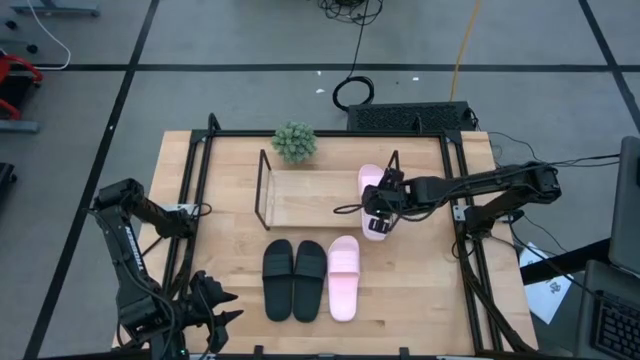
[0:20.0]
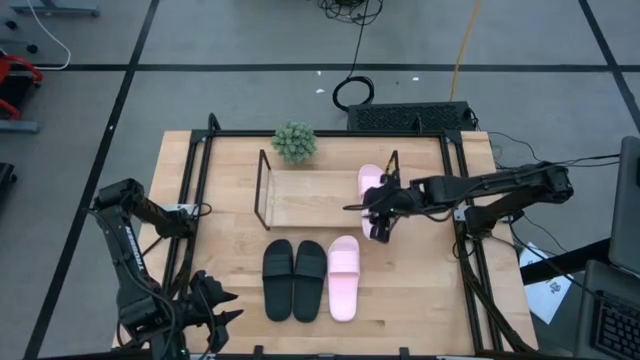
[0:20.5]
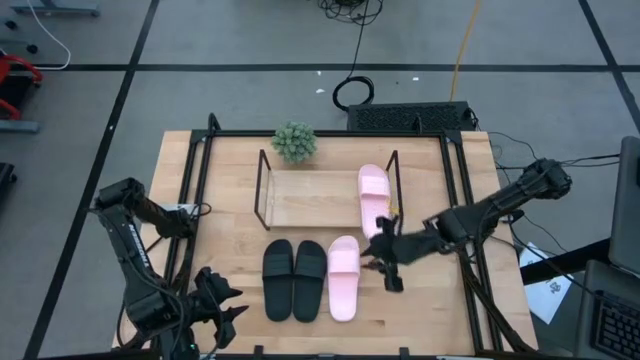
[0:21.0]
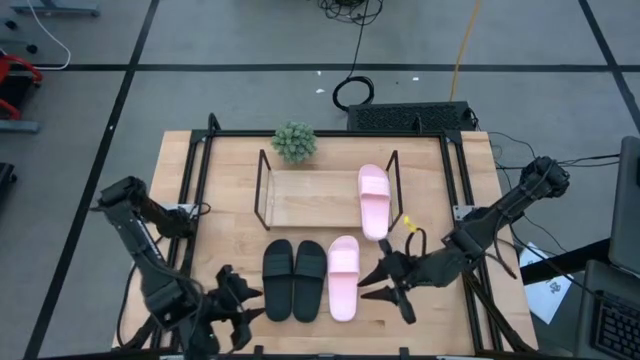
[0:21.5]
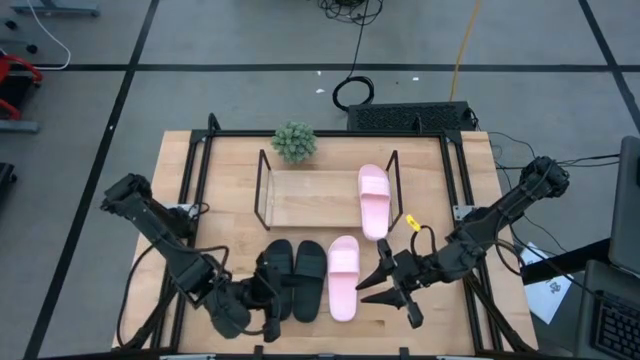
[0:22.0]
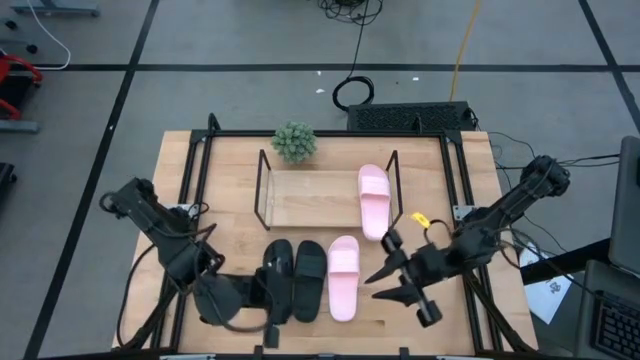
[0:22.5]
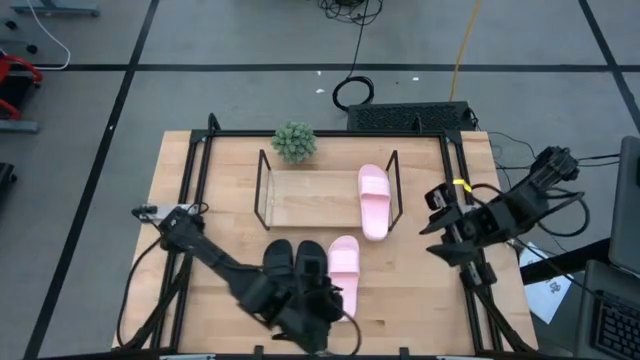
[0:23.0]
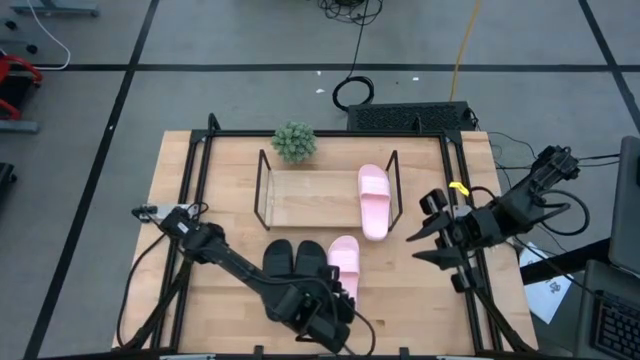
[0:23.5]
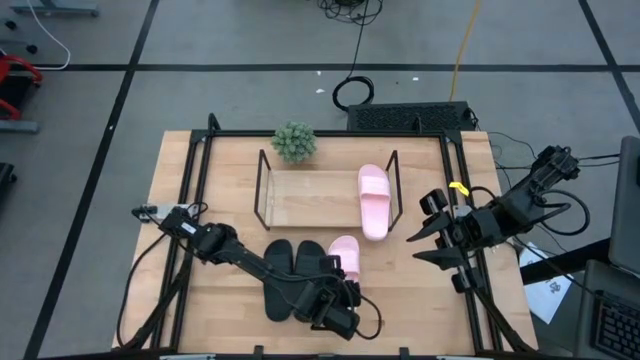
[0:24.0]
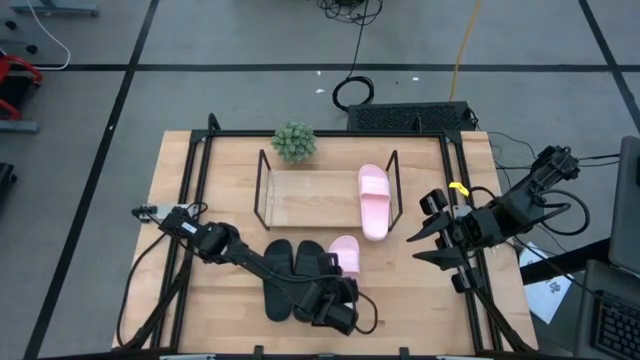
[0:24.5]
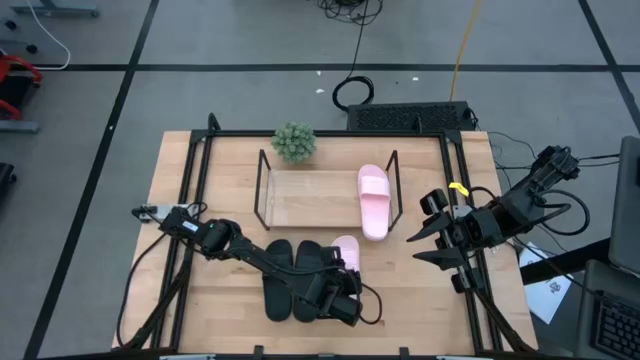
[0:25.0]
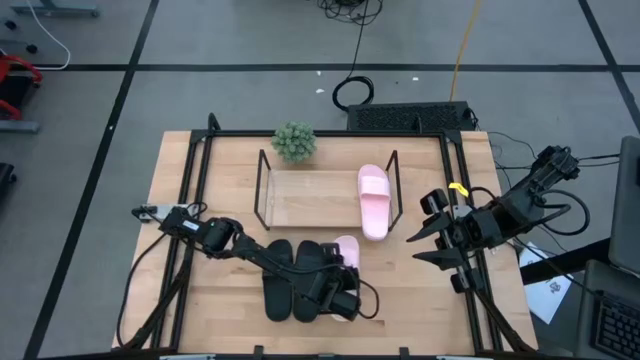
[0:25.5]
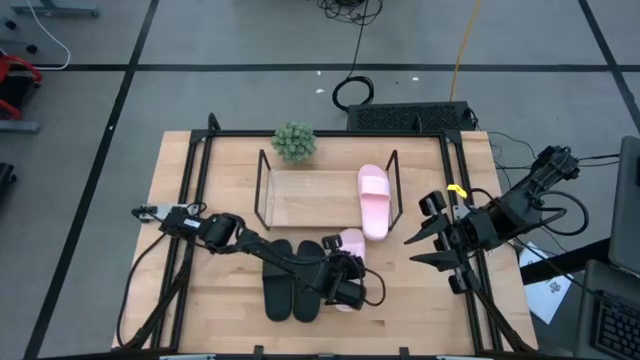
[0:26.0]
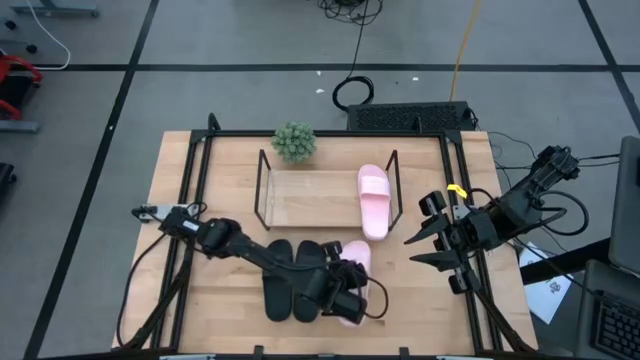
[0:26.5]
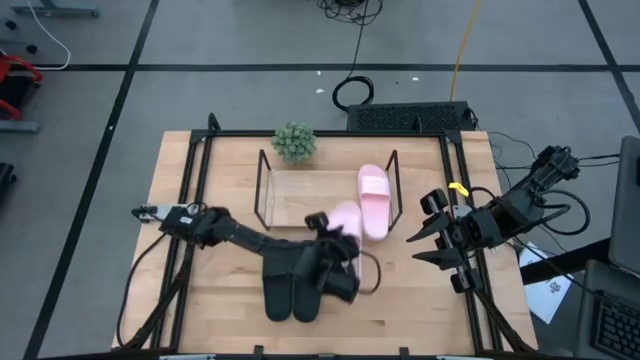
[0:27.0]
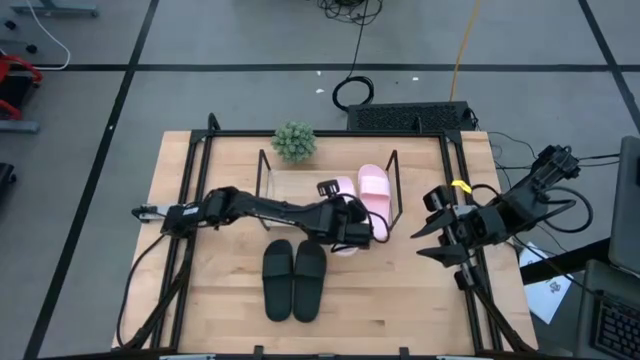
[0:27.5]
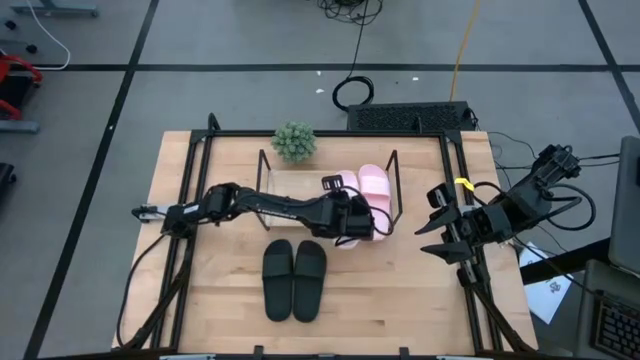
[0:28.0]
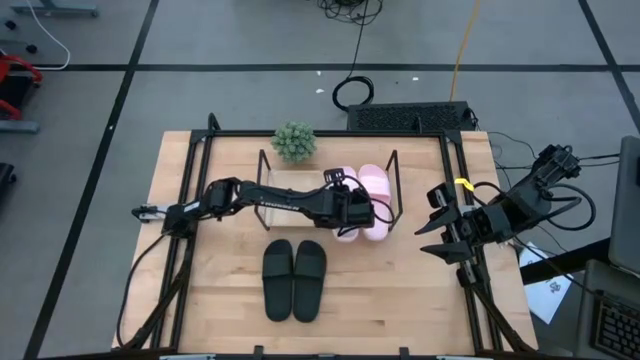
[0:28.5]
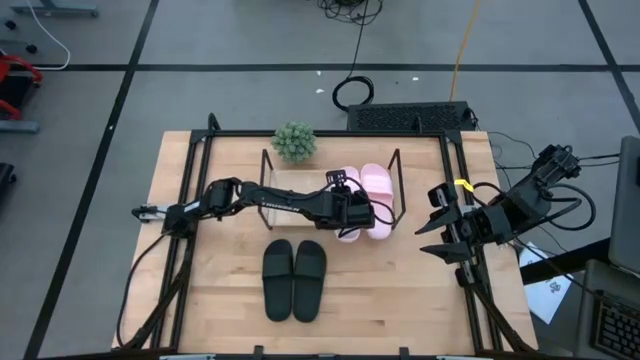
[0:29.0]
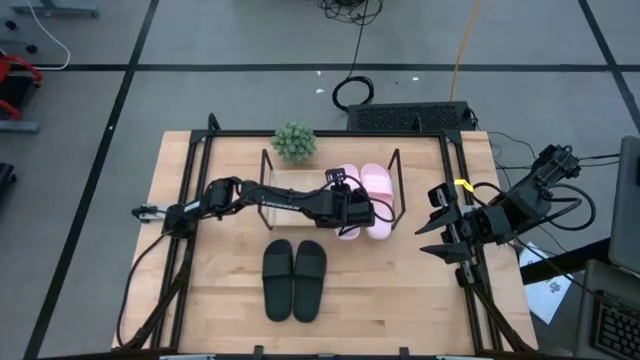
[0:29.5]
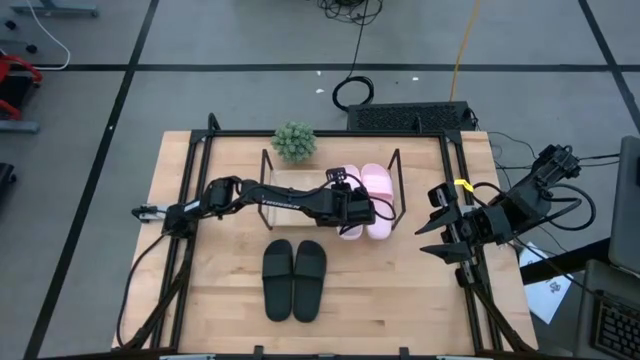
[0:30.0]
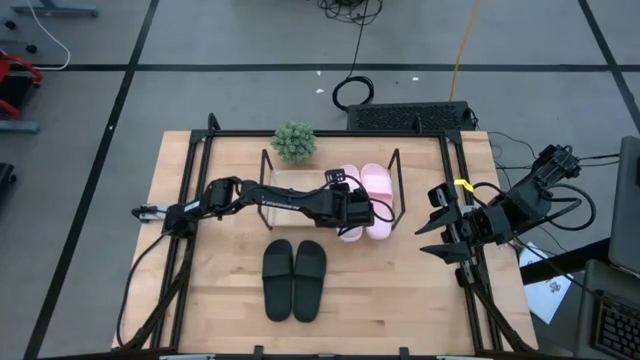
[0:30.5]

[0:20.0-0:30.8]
Task: Pick and place slides into the shelf
Put the pink slide on the shelf

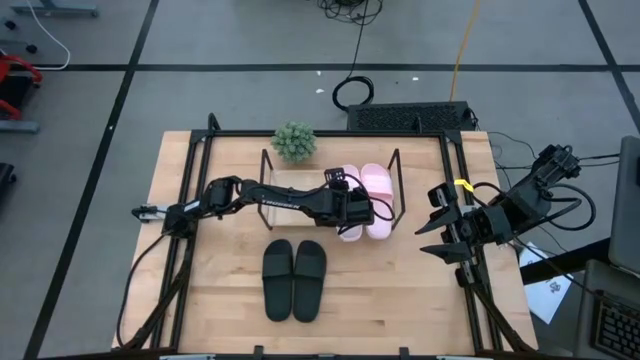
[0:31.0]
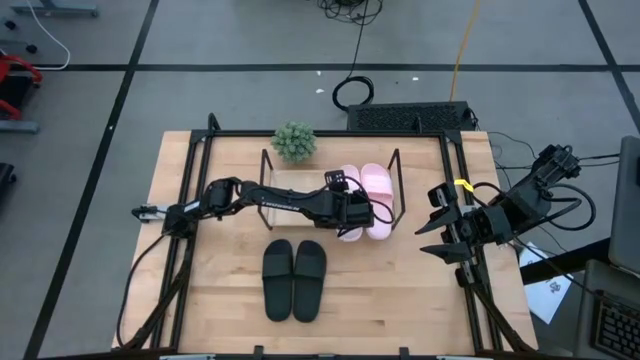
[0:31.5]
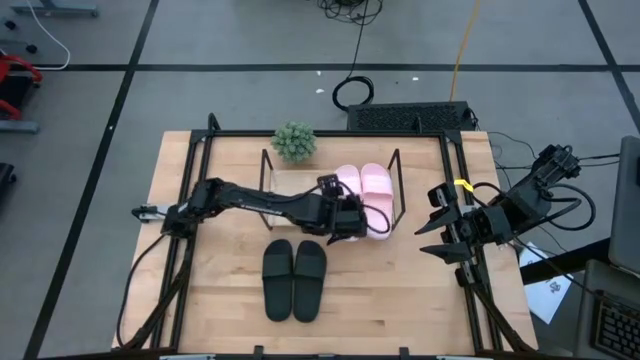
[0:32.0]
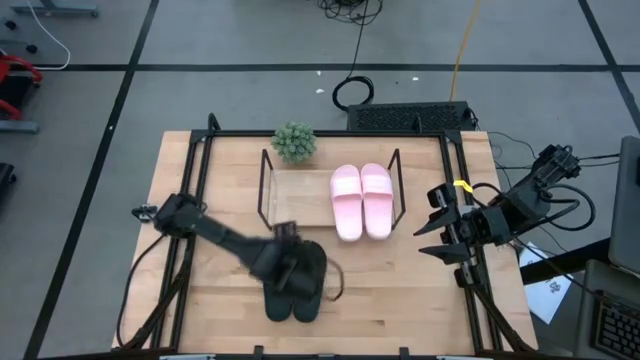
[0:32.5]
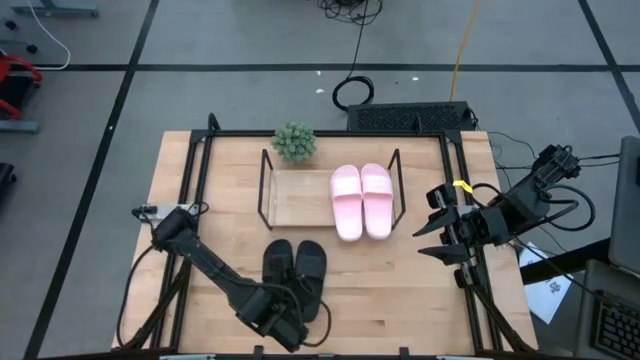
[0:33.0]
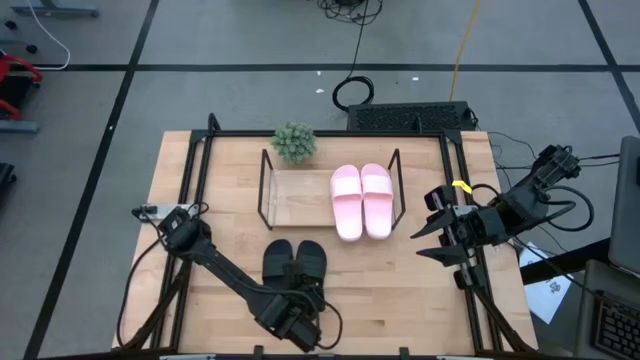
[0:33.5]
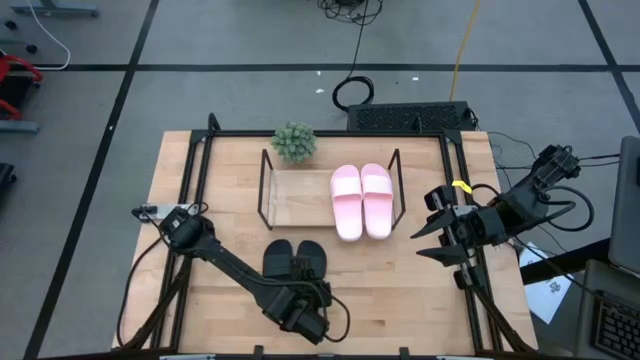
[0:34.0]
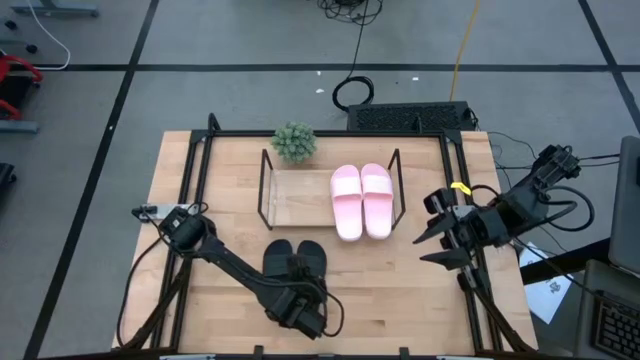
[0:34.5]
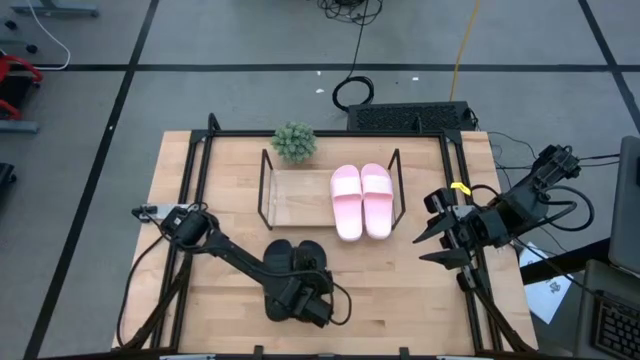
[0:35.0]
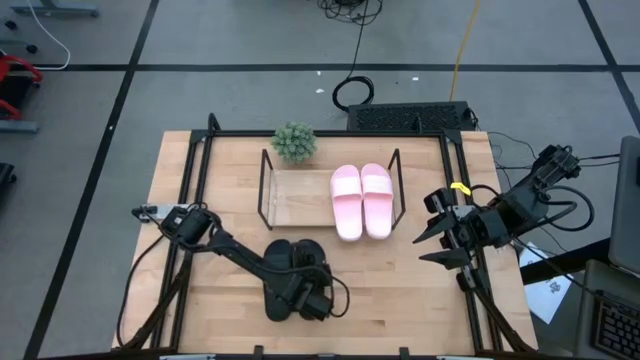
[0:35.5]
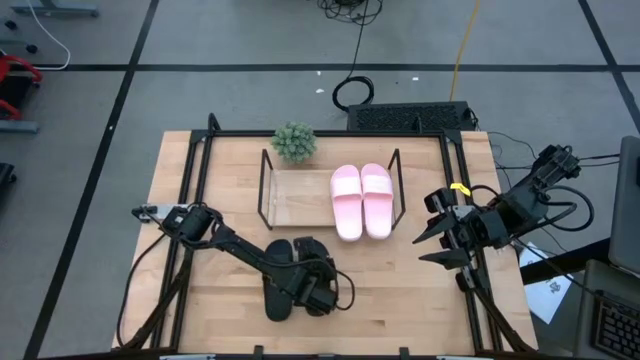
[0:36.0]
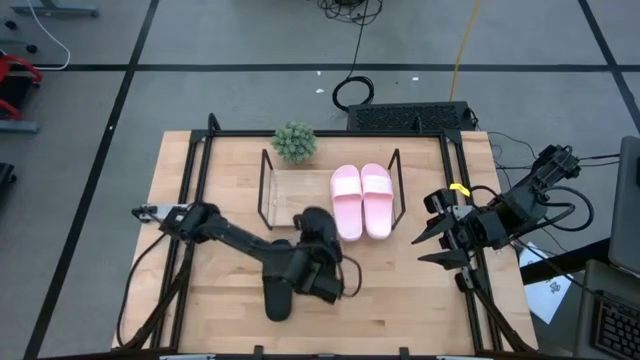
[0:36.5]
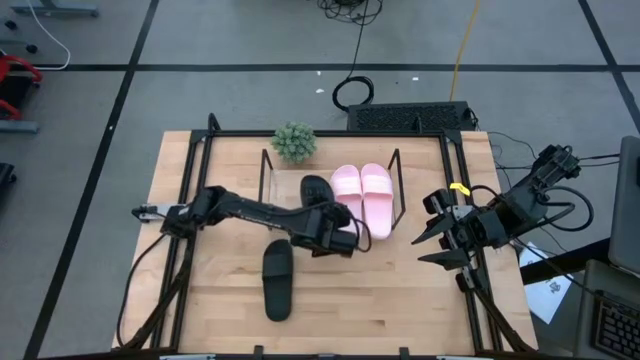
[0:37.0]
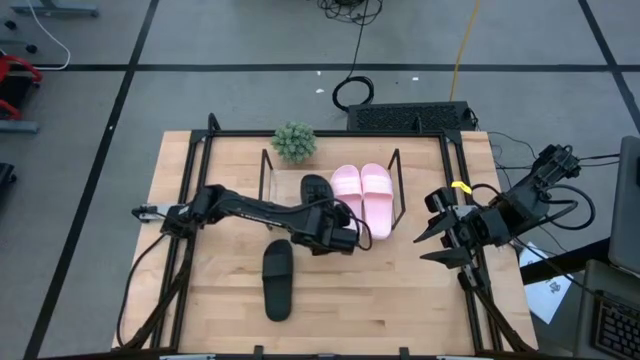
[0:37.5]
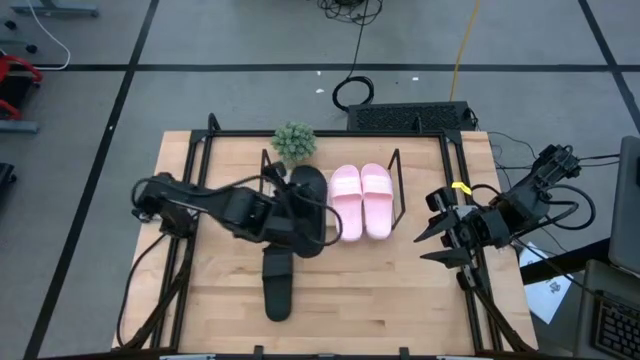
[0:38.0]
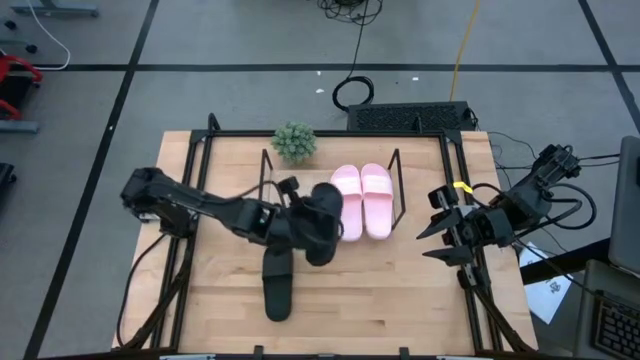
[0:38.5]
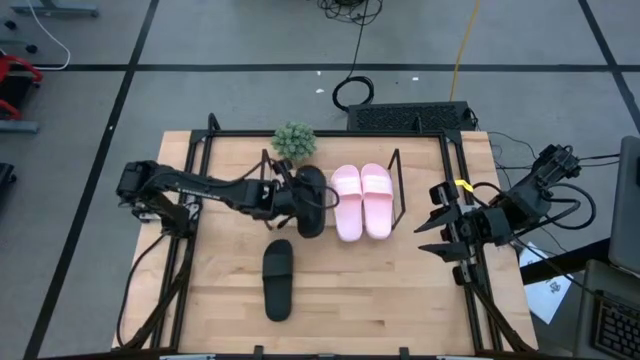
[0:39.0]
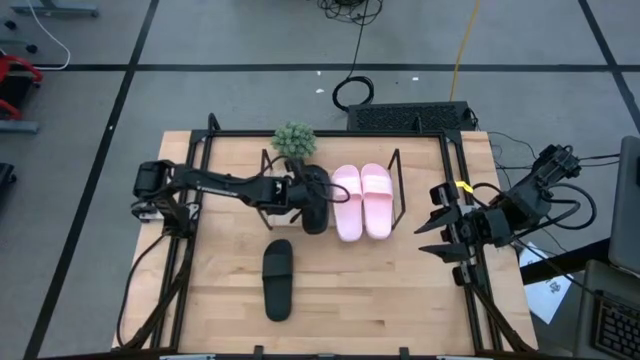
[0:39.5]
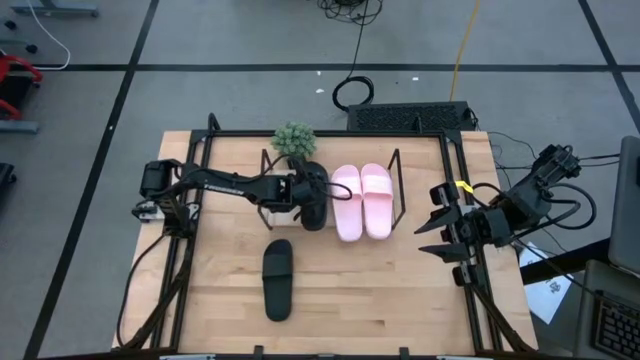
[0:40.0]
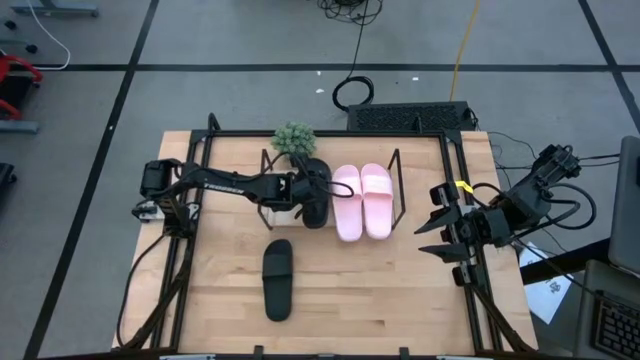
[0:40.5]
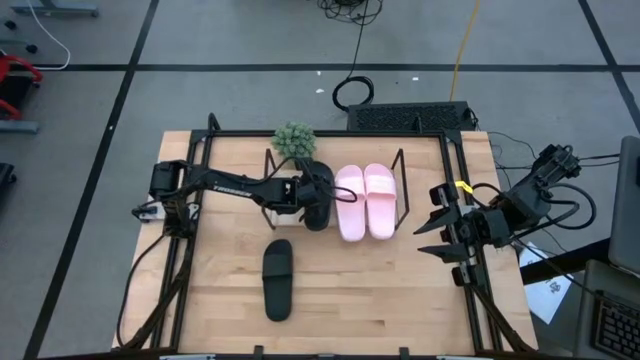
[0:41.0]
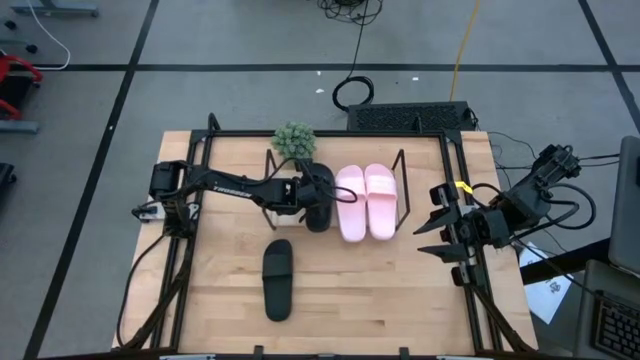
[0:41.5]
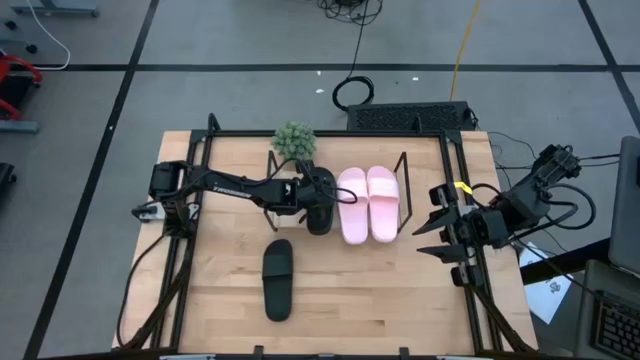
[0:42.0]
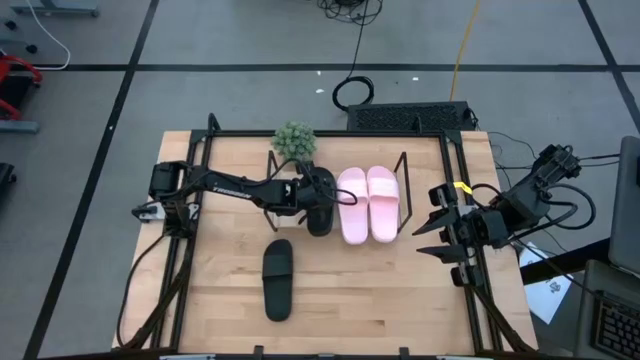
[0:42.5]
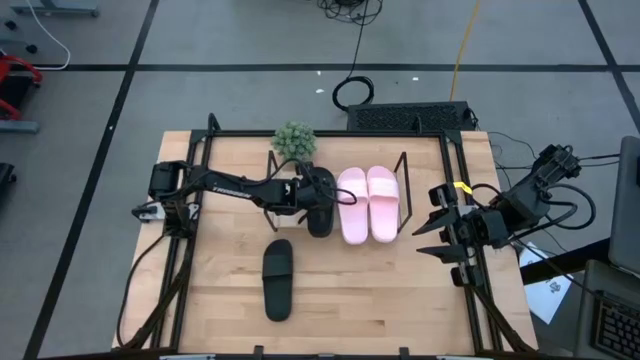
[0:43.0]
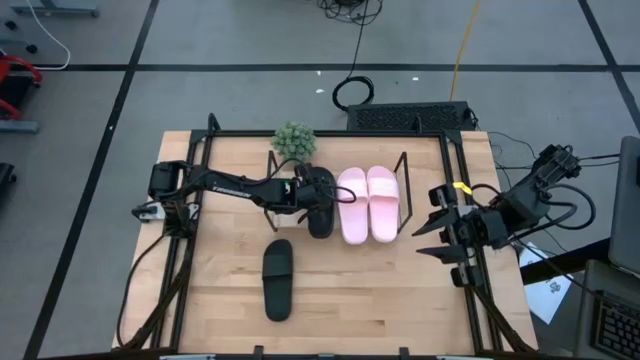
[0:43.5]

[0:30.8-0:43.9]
Put the right black slide on the shelf
